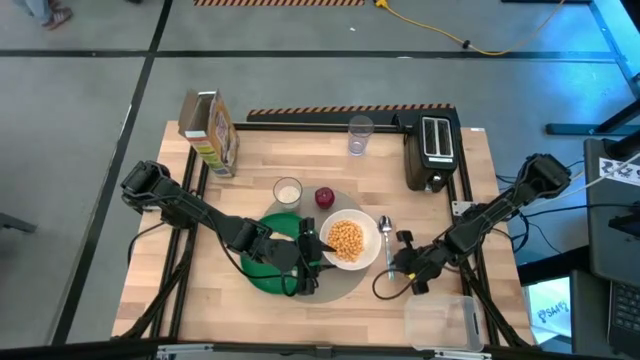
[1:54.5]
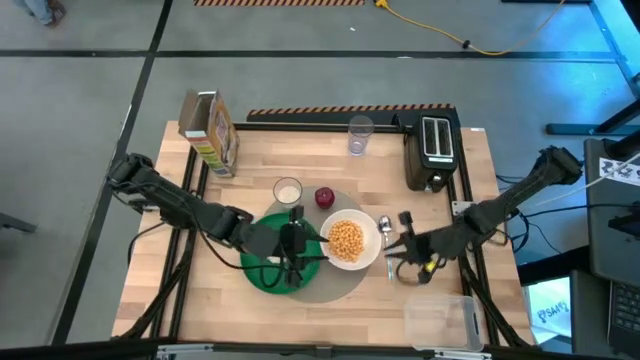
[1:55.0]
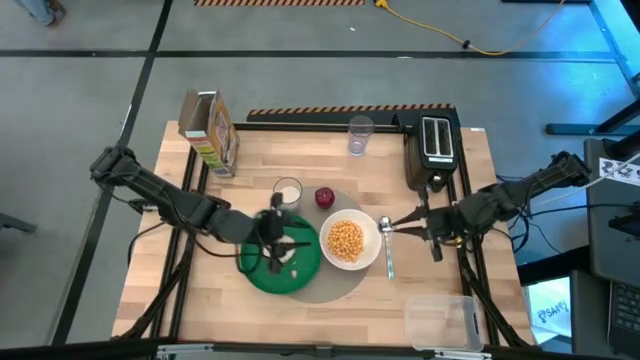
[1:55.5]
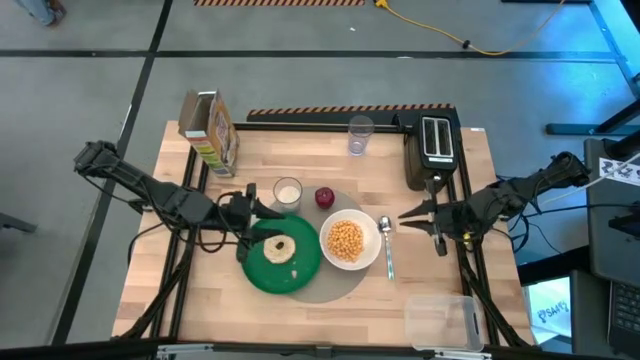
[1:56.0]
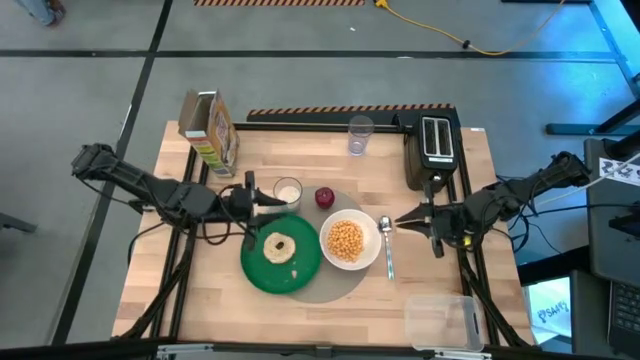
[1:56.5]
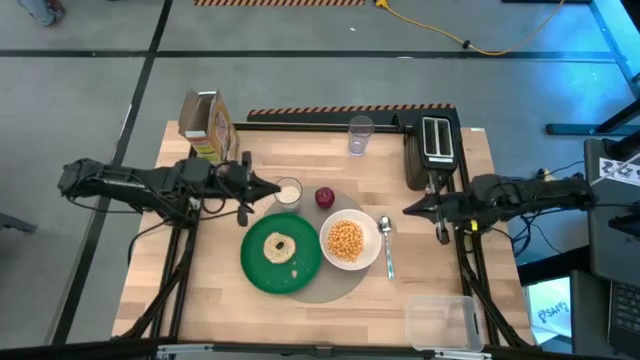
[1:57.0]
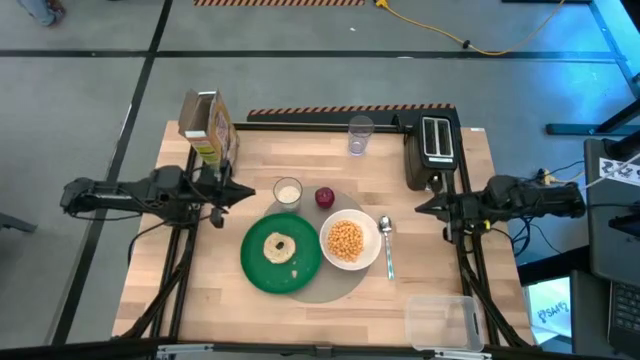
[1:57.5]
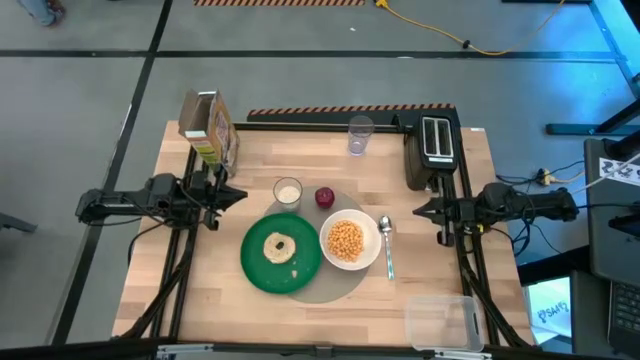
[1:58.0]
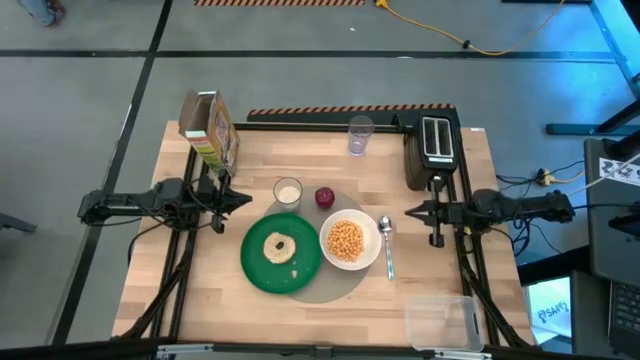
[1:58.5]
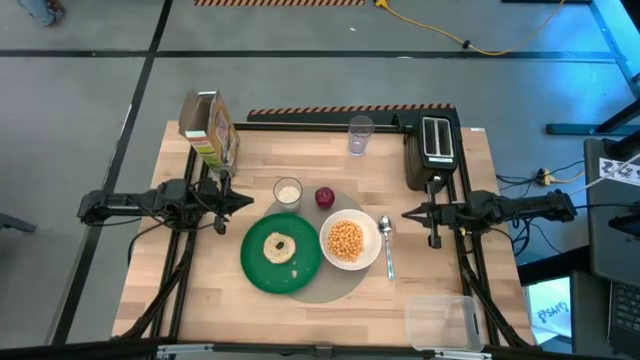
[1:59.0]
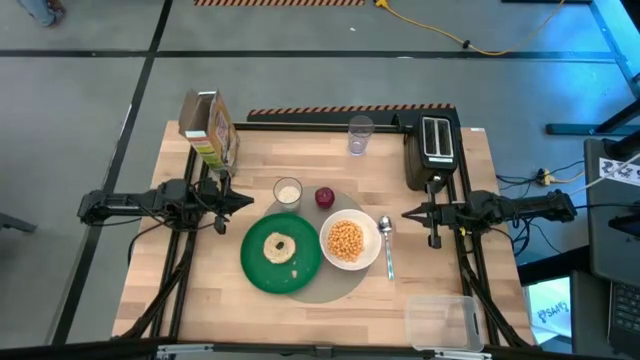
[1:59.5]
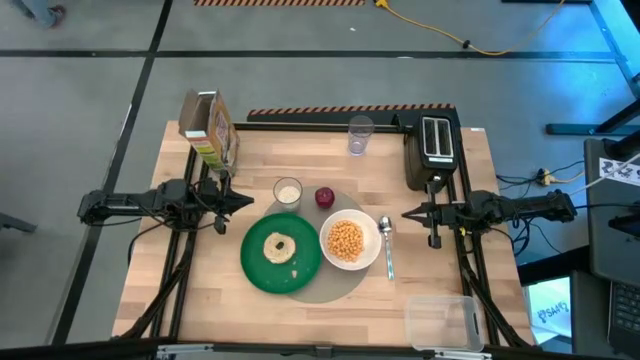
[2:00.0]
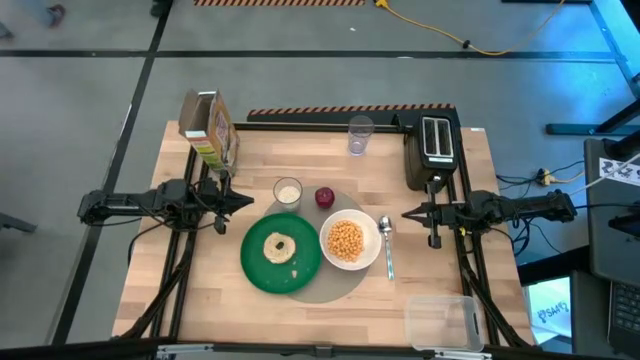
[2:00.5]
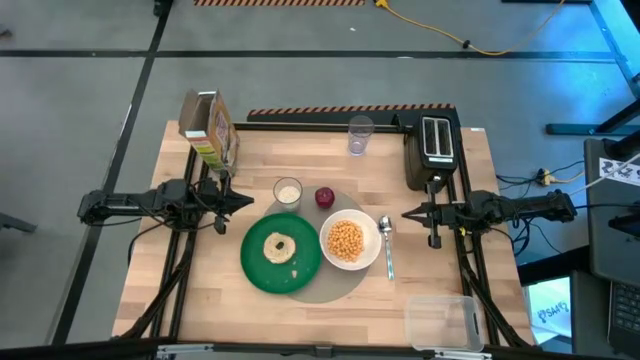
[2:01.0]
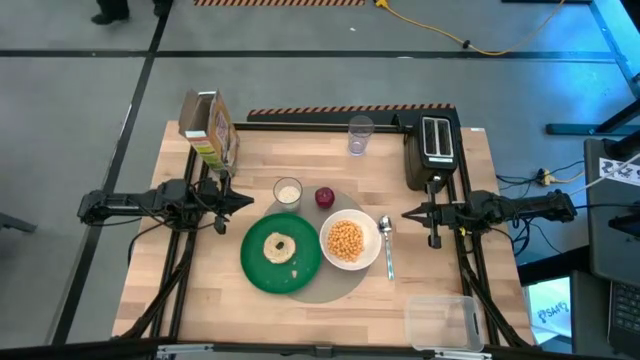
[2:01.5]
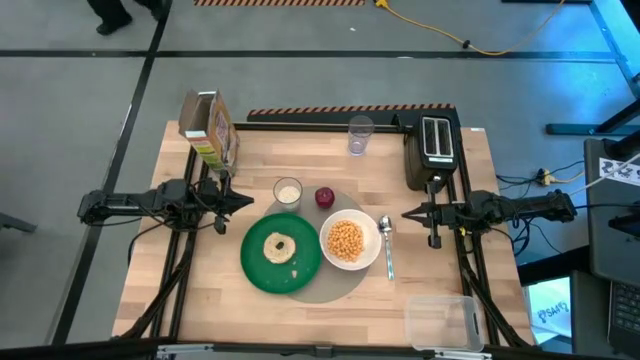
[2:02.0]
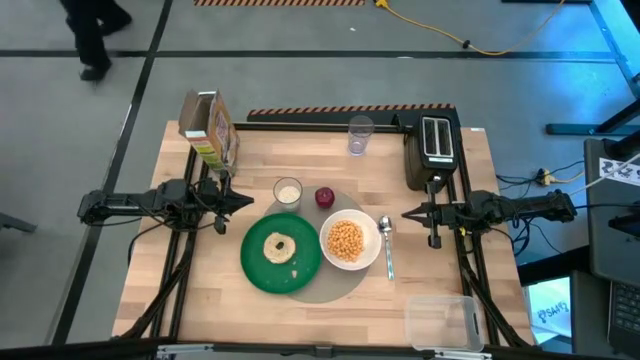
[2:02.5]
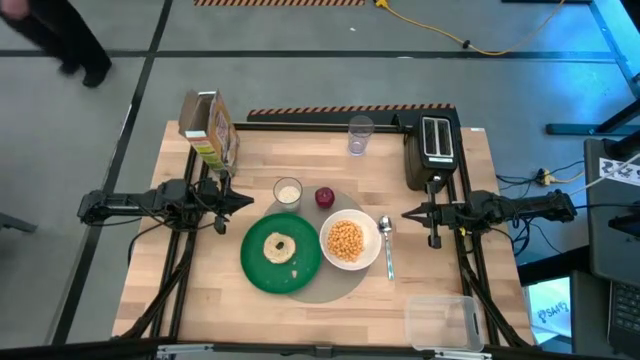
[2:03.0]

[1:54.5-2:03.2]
Task: Arrange a breakfast setting
Return to Home Position

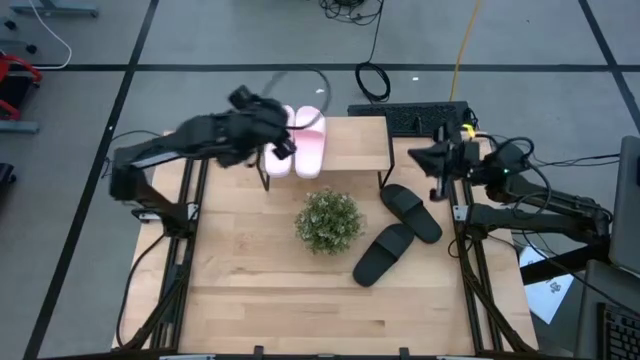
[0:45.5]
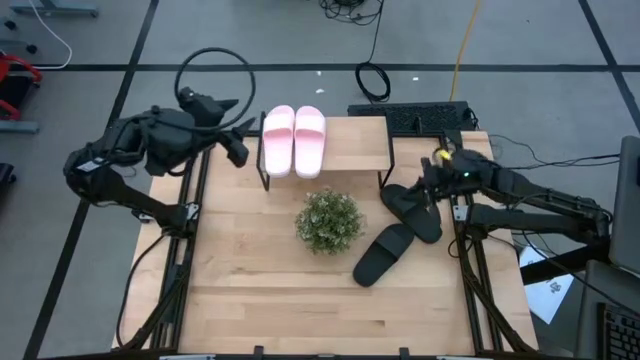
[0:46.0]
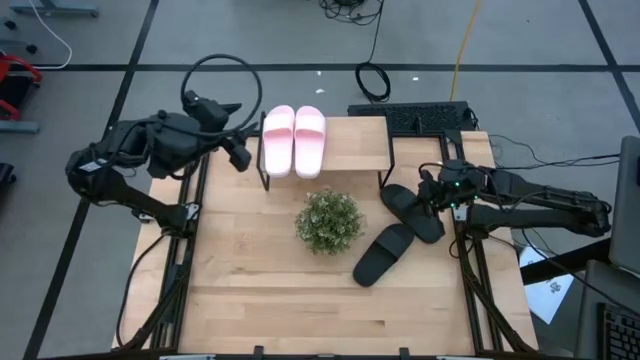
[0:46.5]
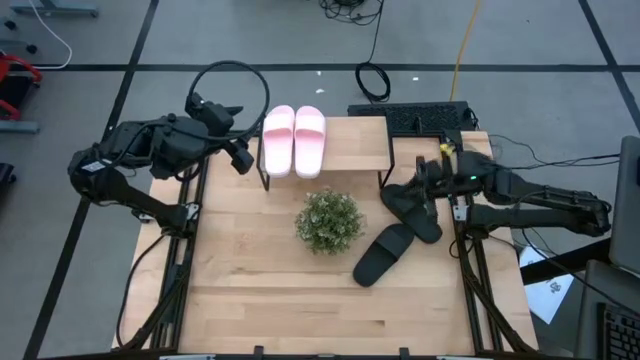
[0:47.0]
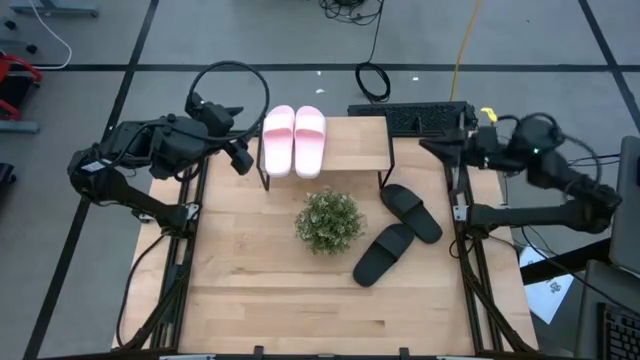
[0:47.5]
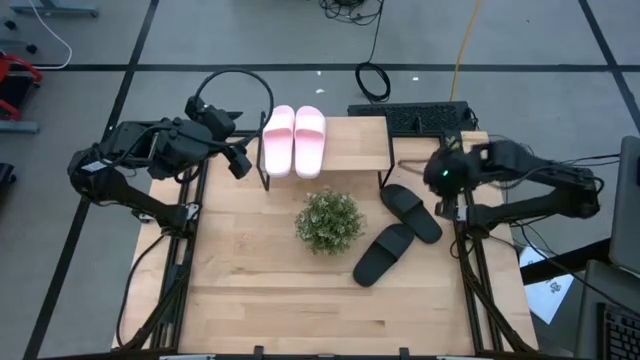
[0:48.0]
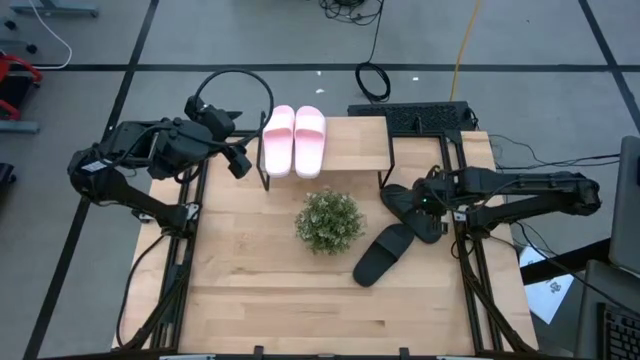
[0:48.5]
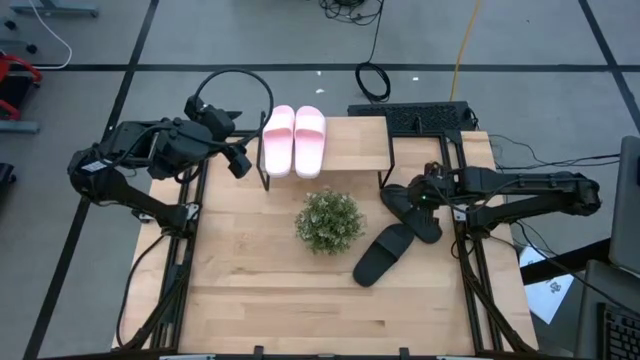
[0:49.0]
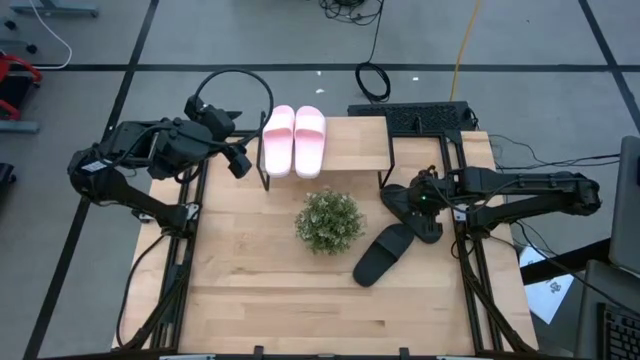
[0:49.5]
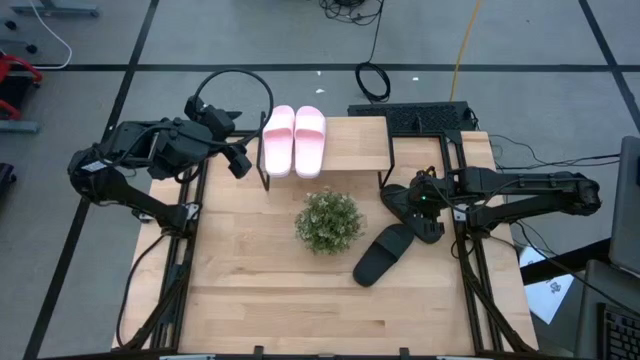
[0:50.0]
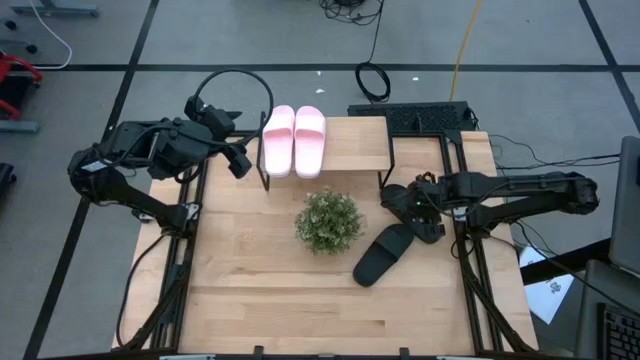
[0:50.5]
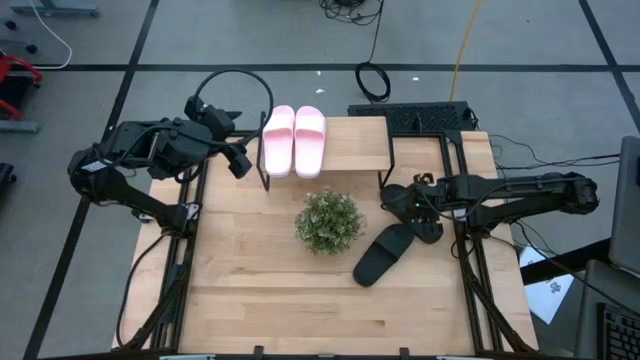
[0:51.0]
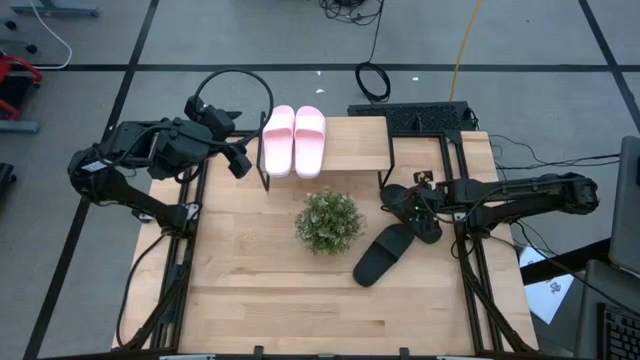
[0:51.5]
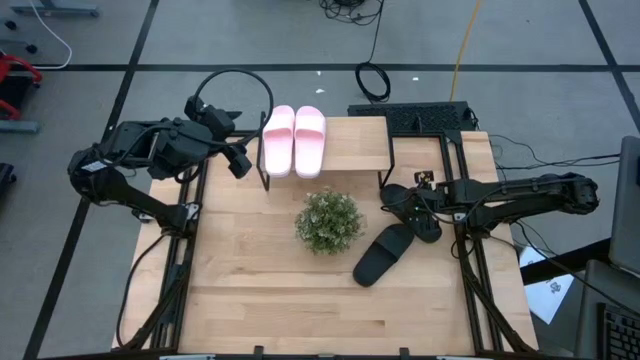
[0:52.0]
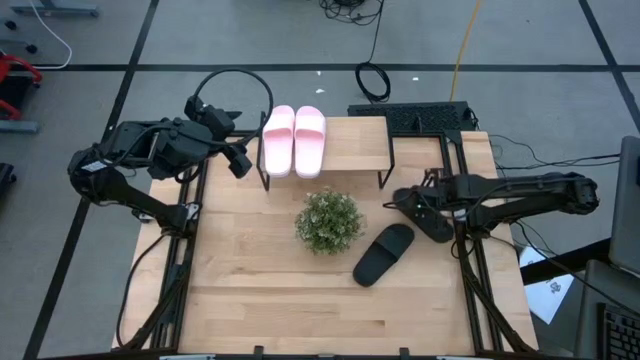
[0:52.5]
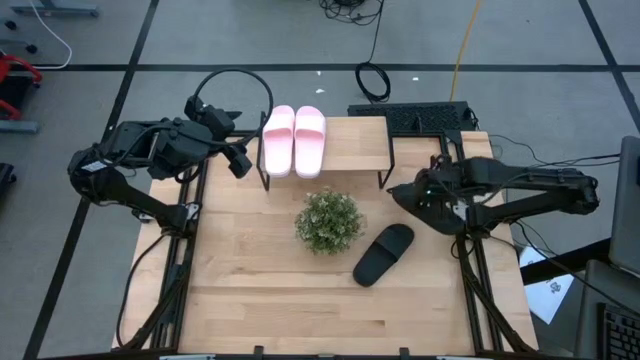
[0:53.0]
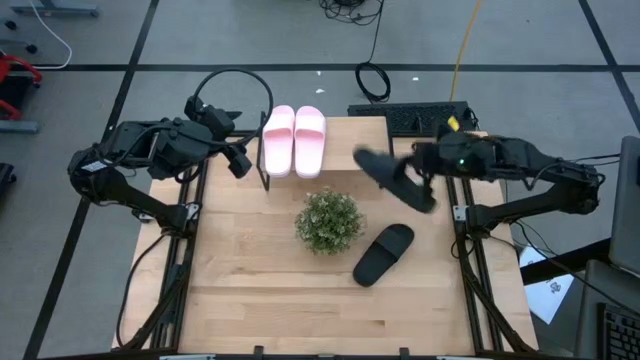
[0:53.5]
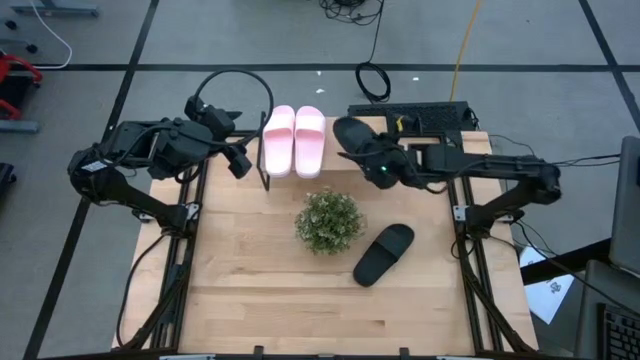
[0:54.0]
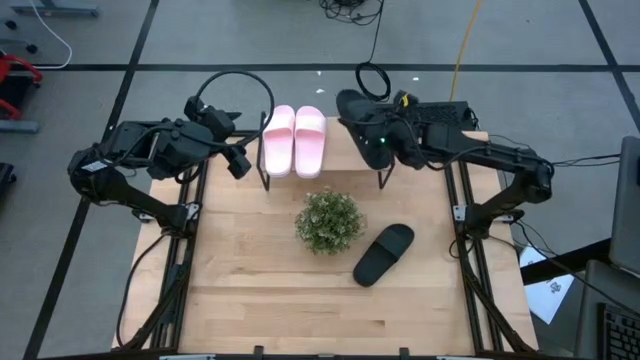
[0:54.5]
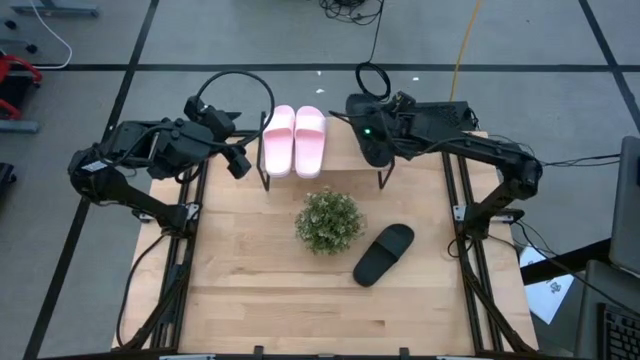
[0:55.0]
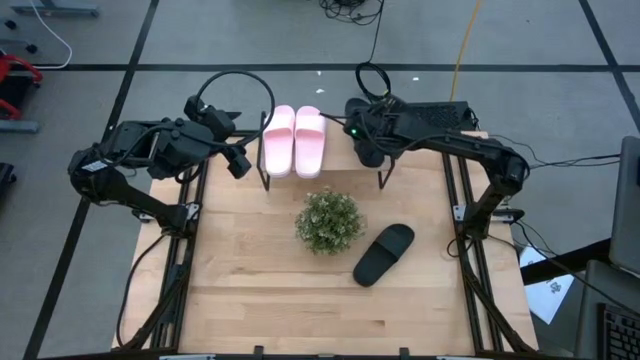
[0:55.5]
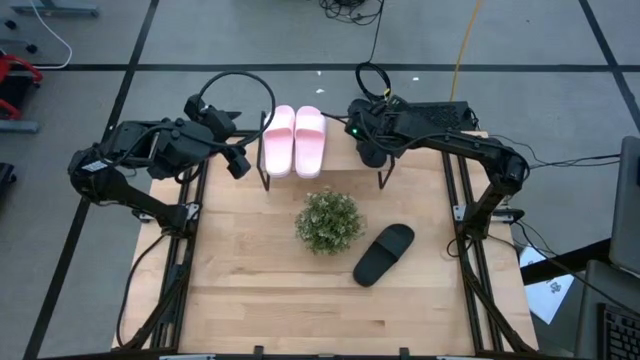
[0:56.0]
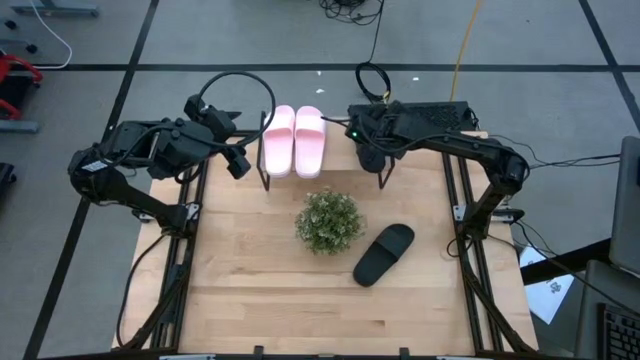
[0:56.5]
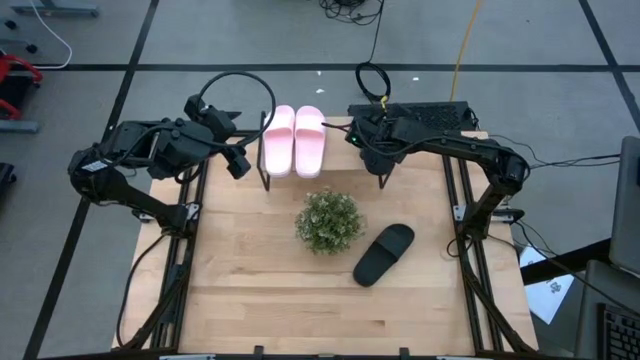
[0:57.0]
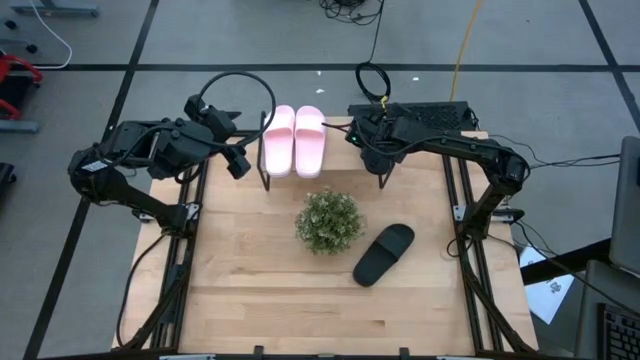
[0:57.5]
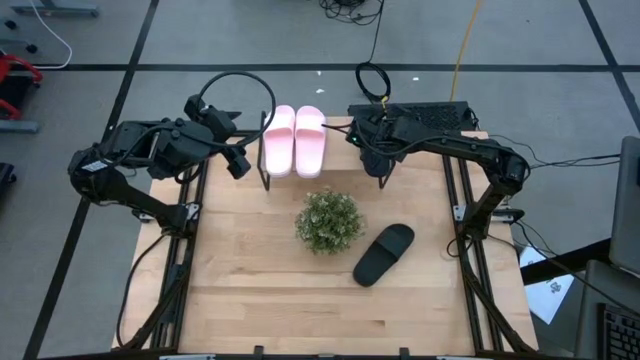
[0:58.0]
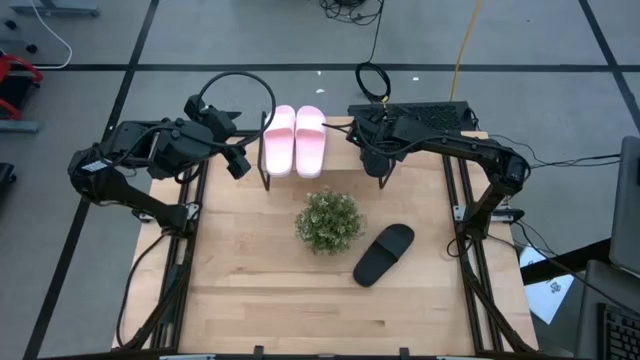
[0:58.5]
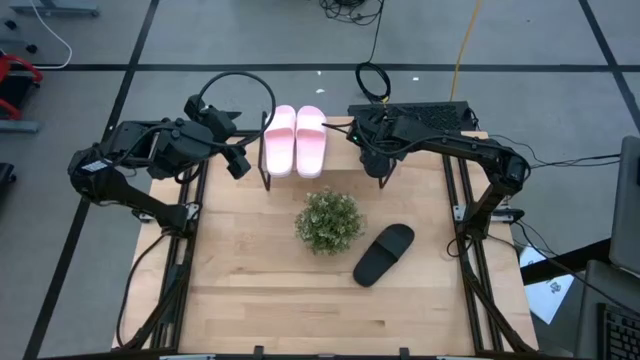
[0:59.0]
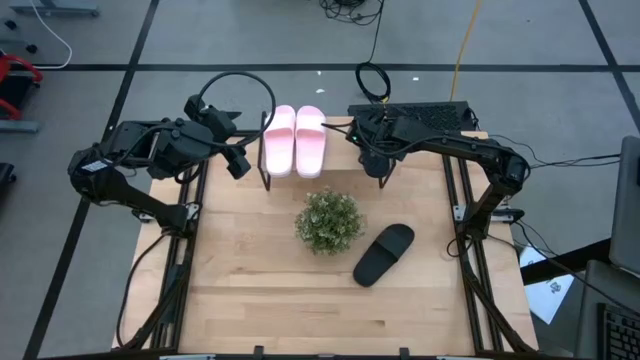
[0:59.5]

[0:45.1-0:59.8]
Task: Pick and place slides into the shelf
Put the top black slipper on the shelf
